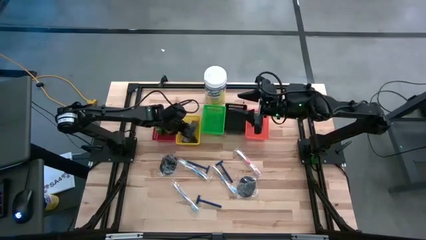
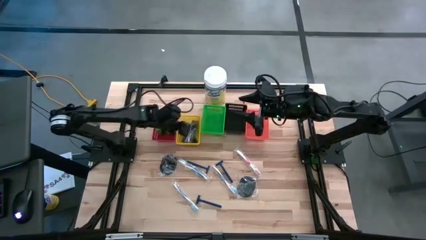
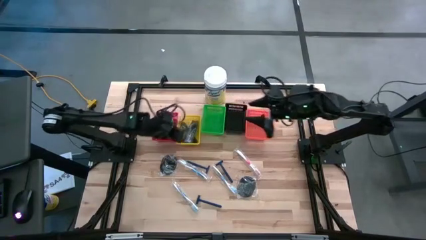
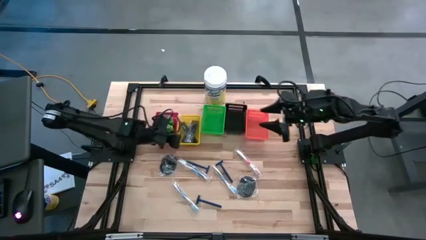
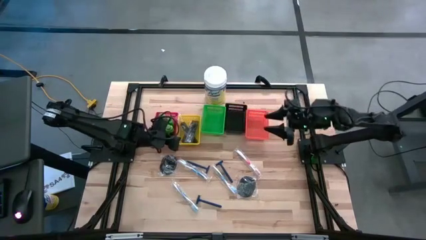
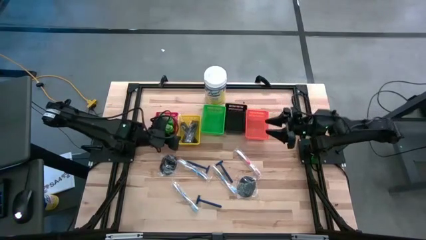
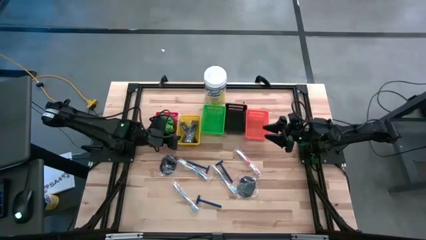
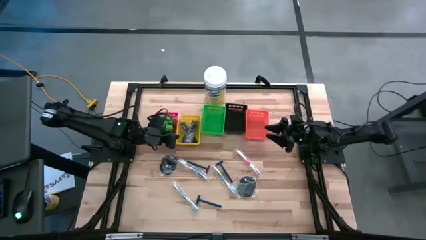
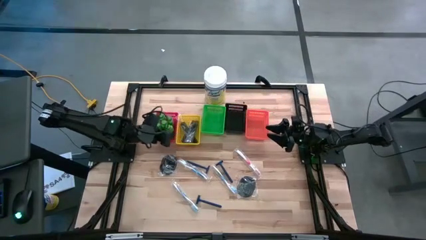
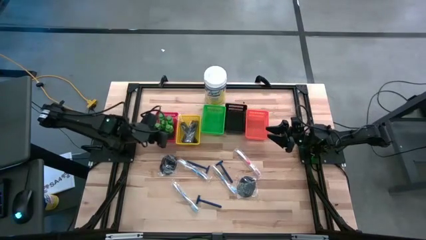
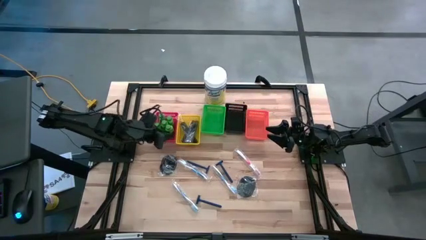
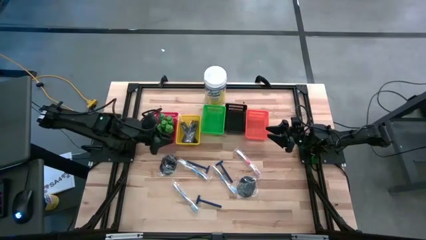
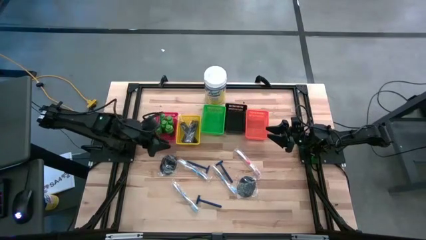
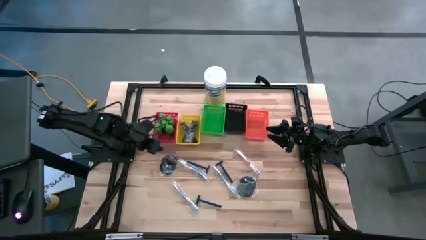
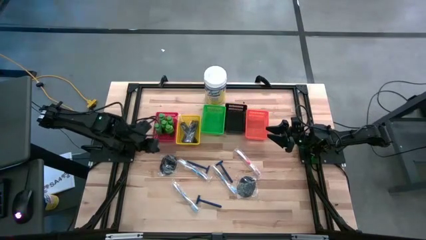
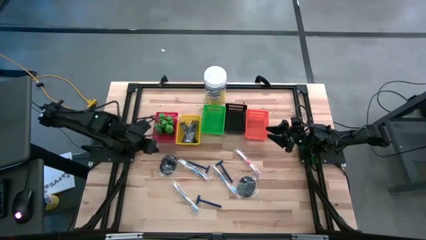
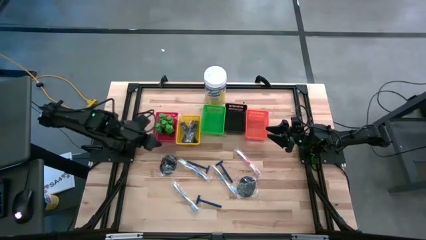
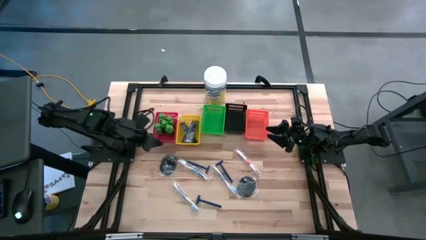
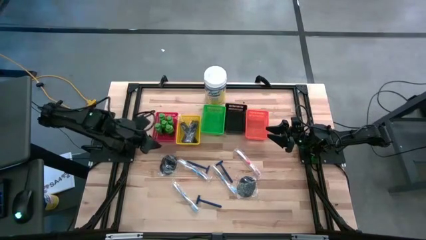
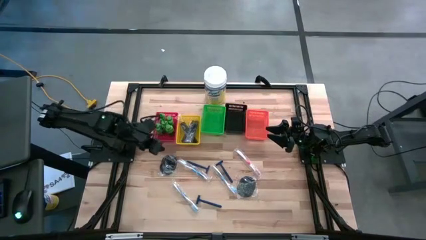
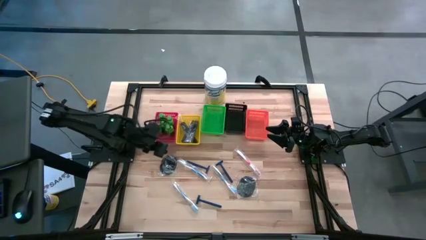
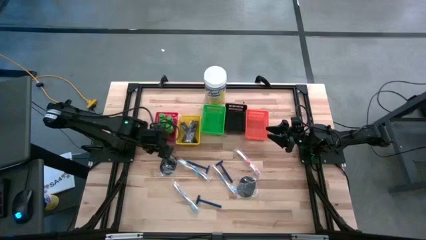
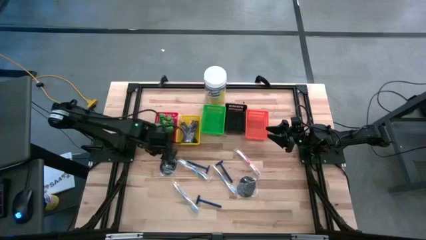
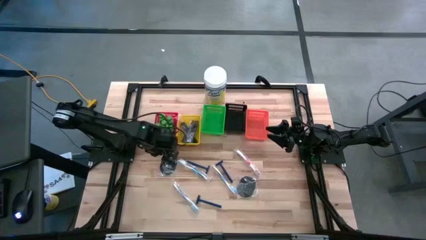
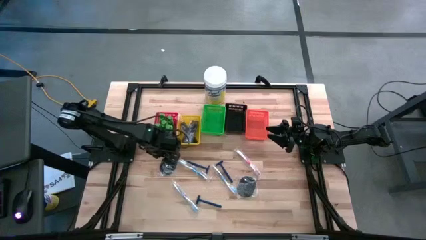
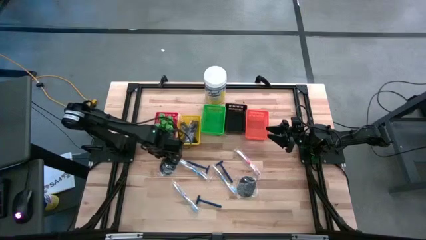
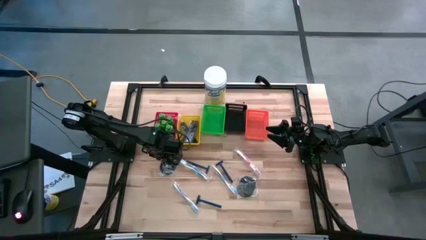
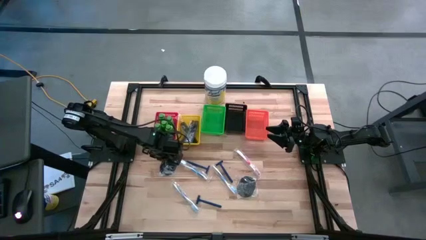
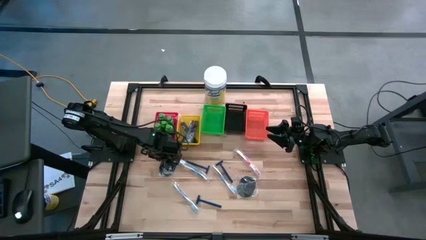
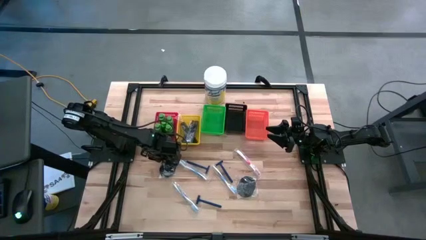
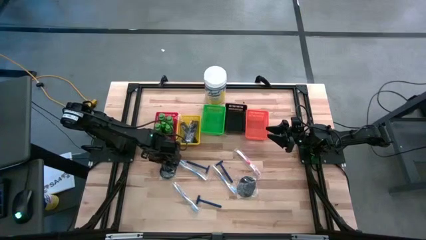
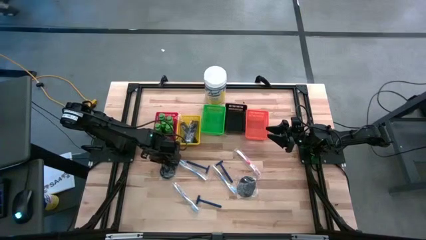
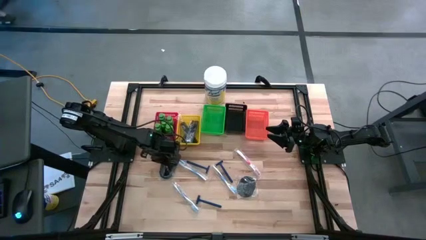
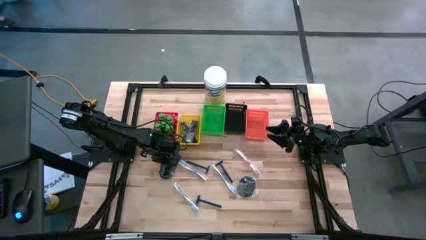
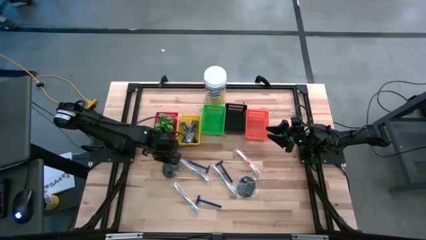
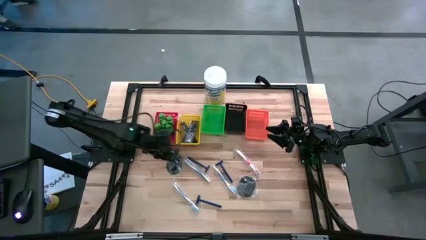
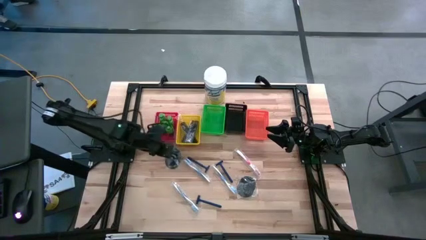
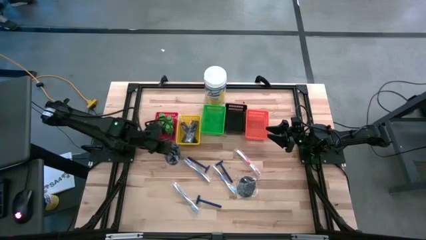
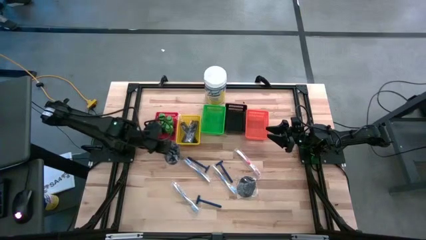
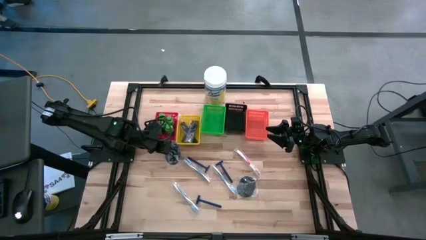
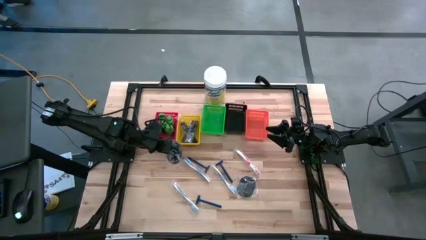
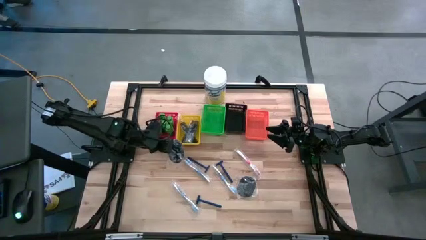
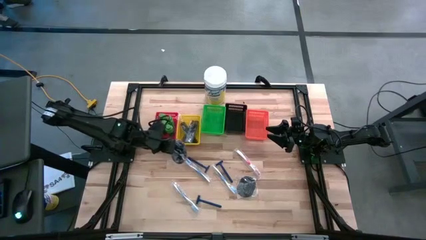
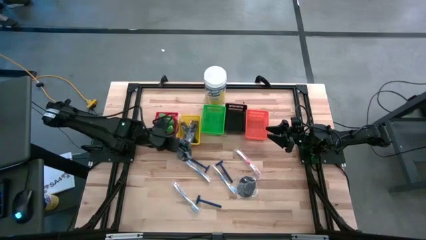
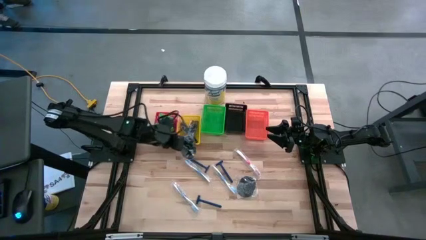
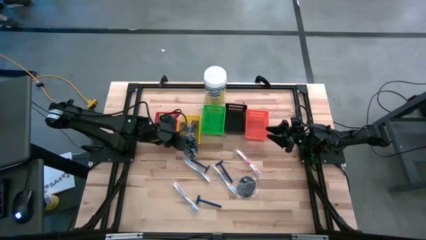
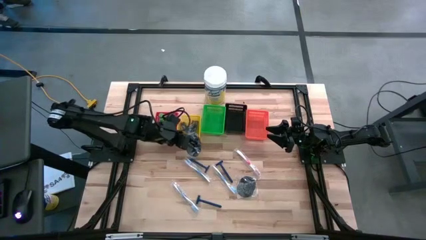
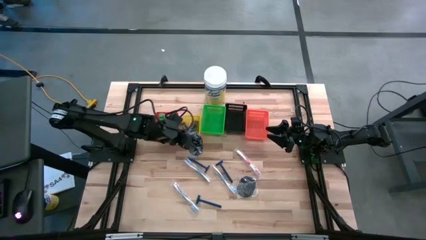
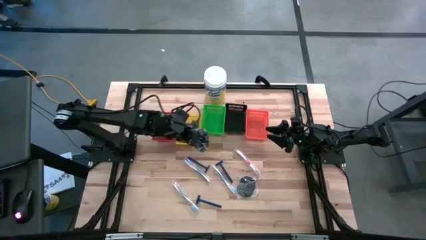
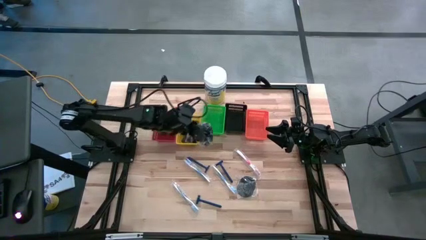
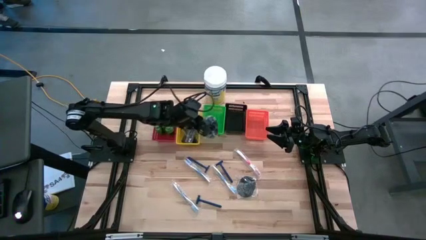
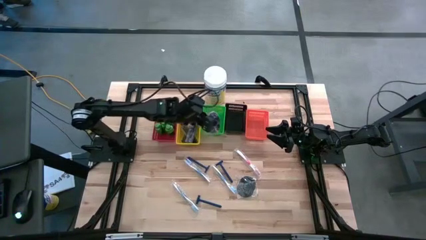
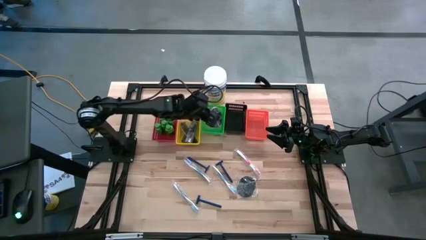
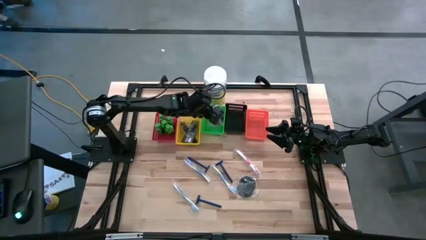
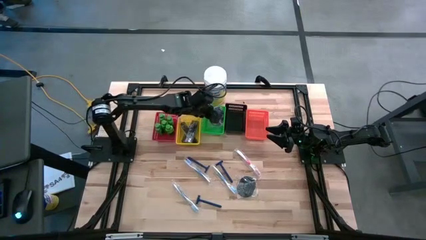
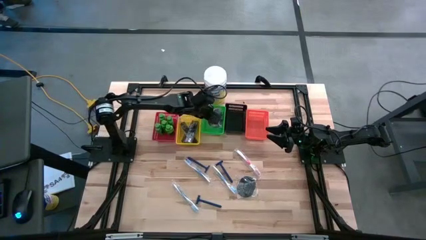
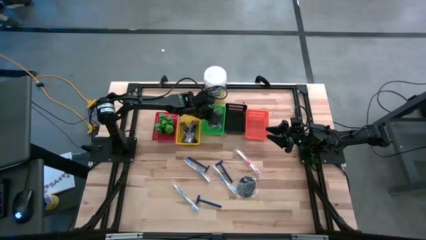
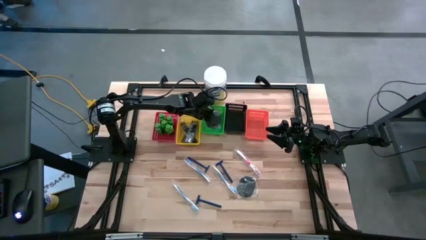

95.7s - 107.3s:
Task: Pick & Place Travel size toiletries
Put the black hairbrush into the green bin

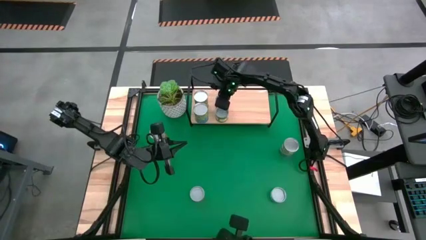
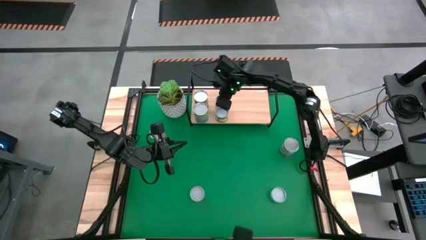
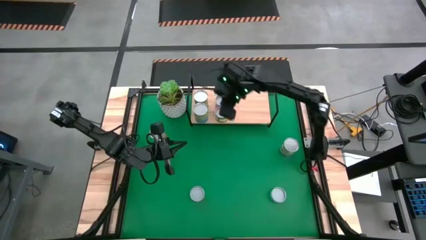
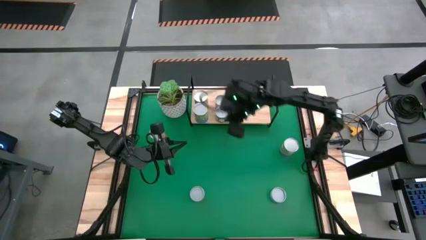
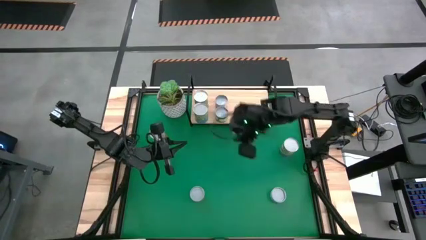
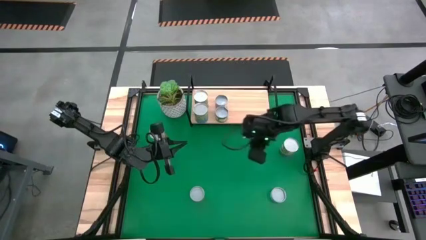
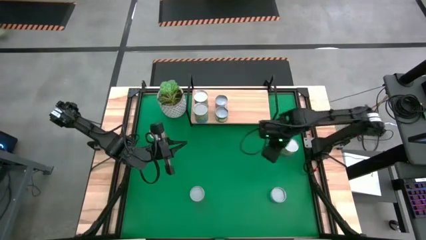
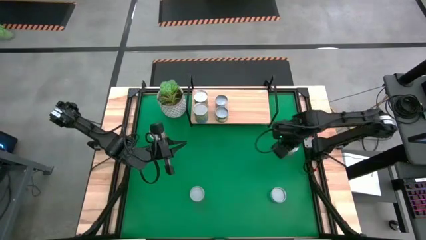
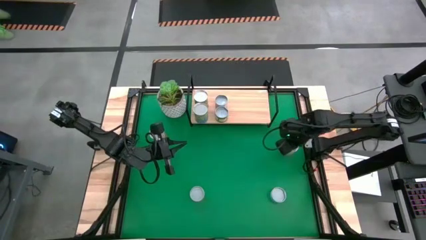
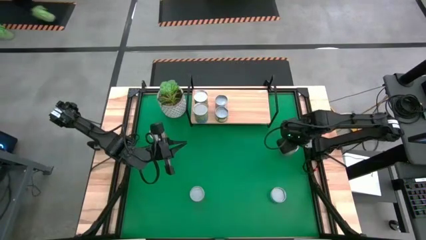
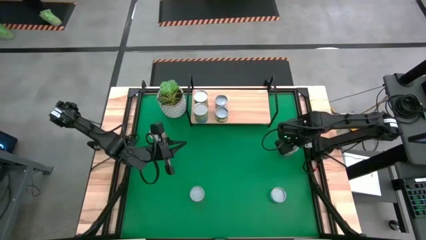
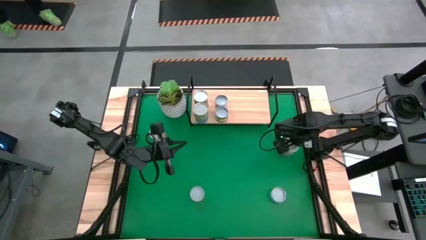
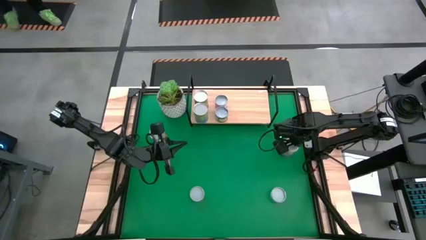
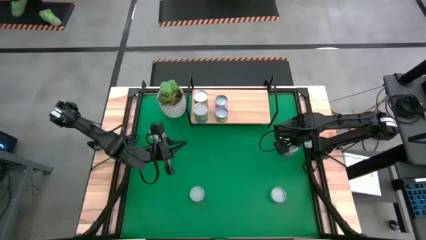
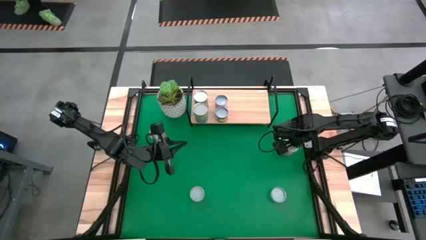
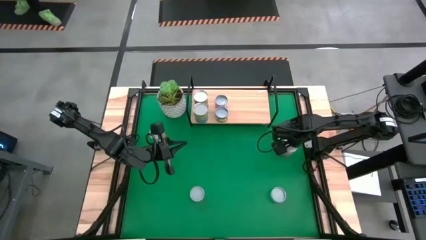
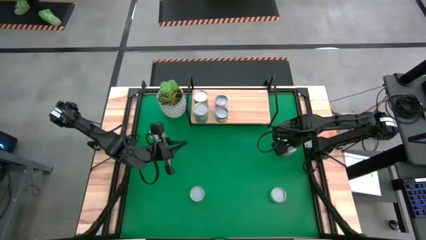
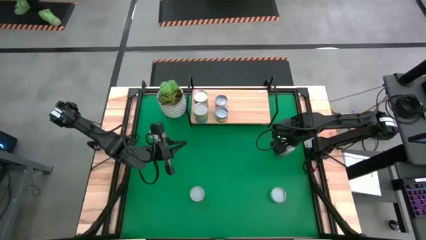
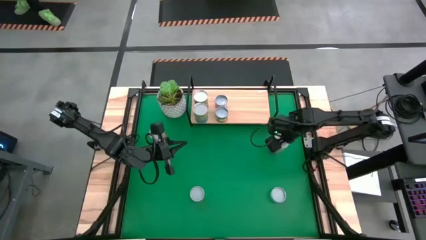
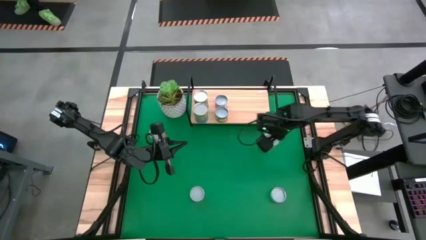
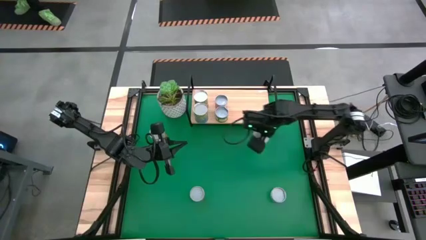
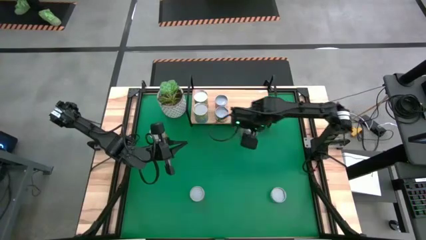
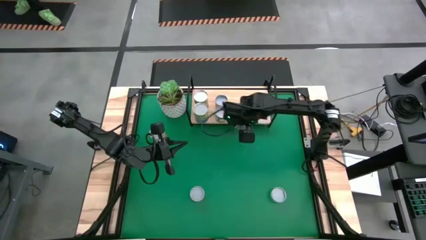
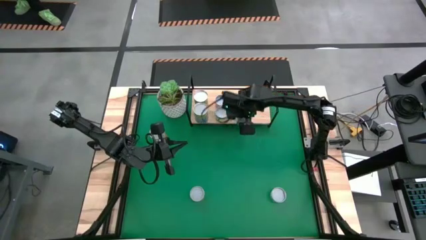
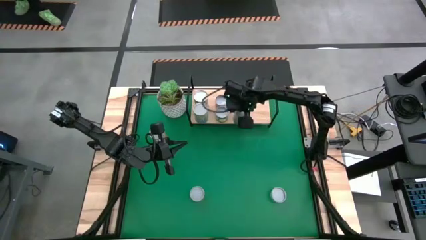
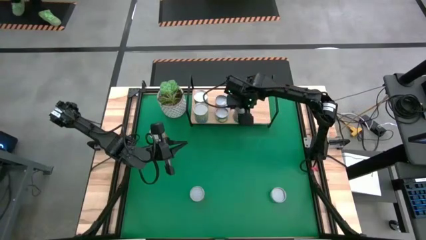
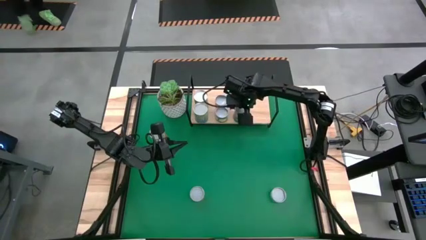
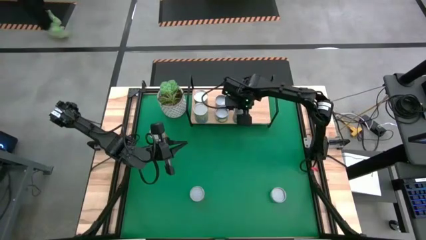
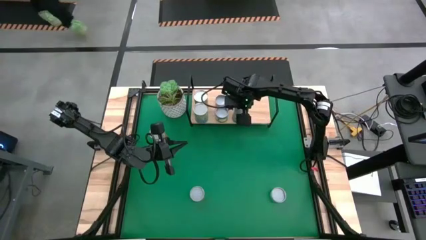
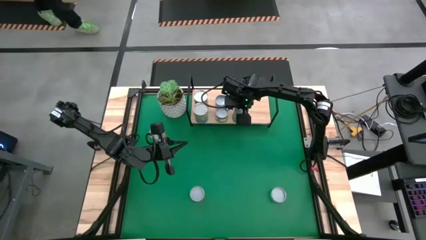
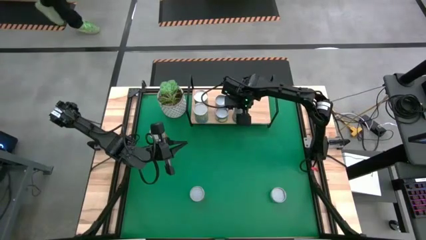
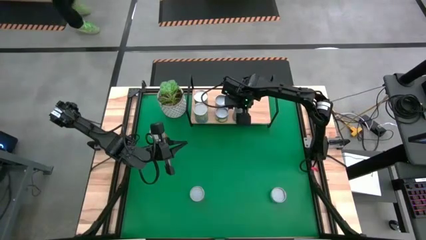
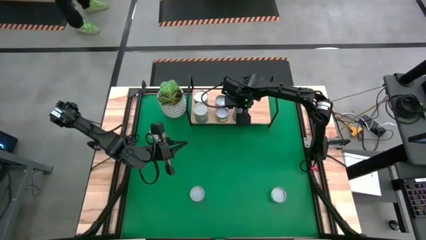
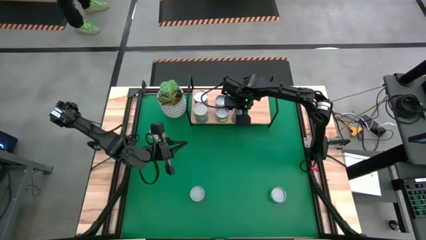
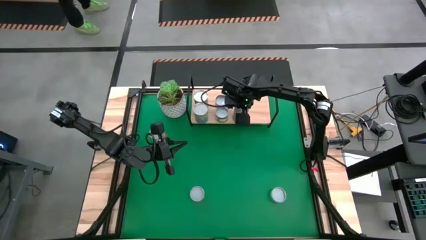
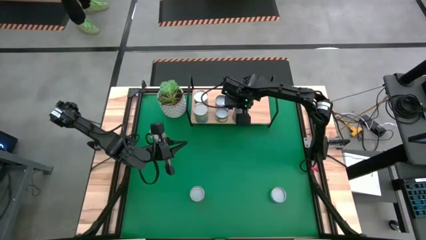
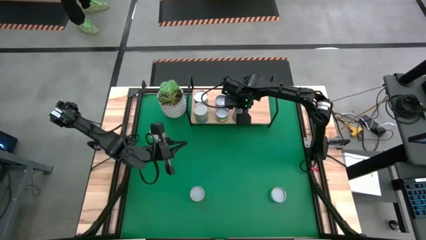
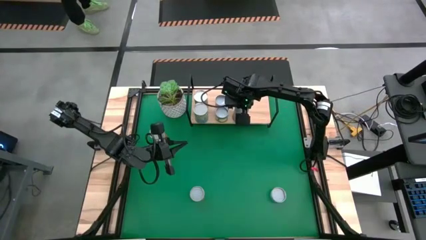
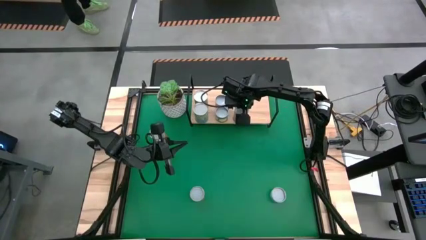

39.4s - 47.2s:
Task: Pick and place cans onto a shelf
Put the canned peas on the shelf
